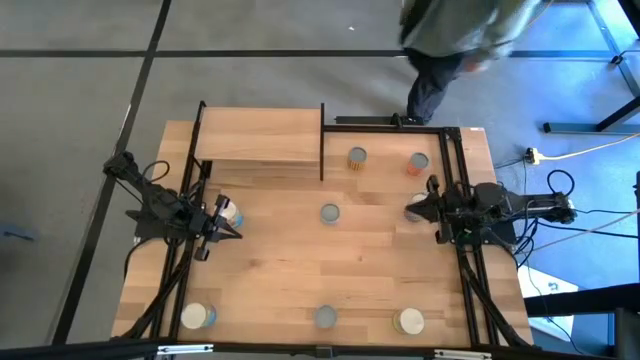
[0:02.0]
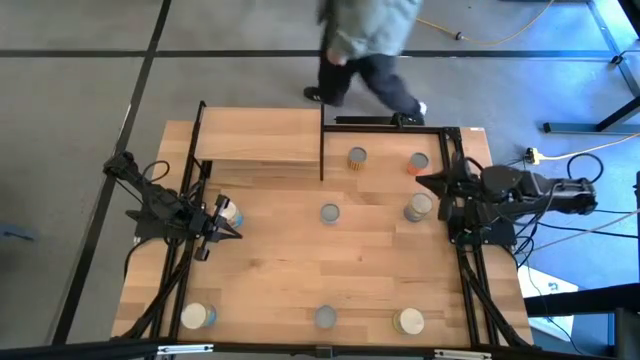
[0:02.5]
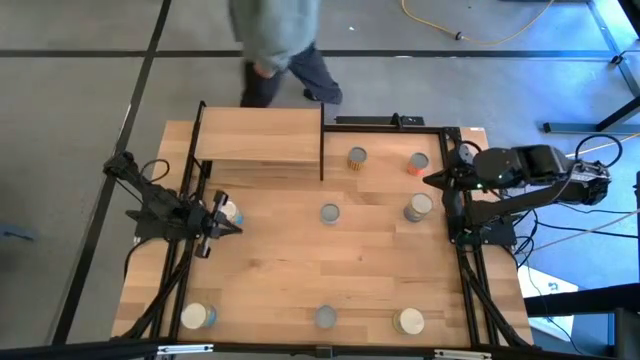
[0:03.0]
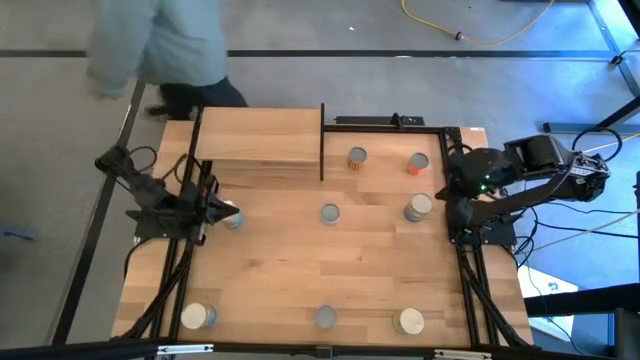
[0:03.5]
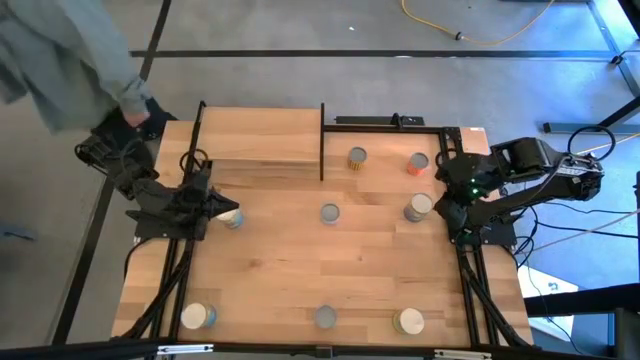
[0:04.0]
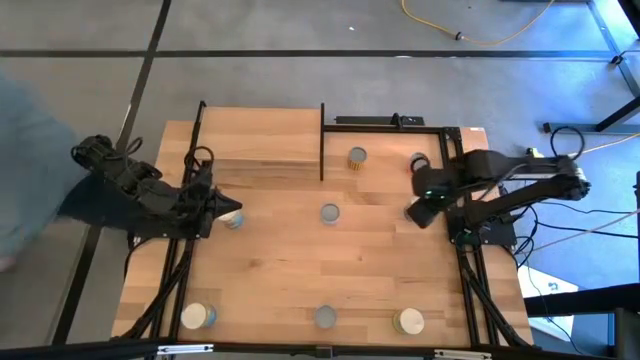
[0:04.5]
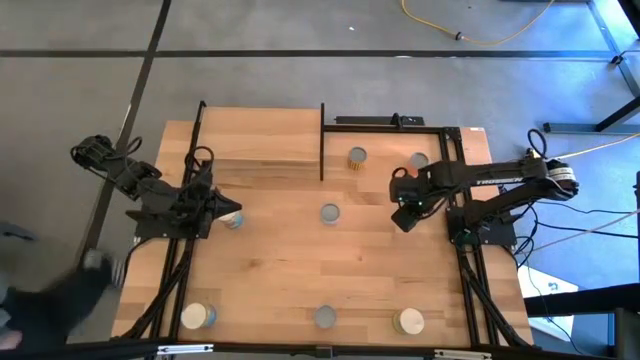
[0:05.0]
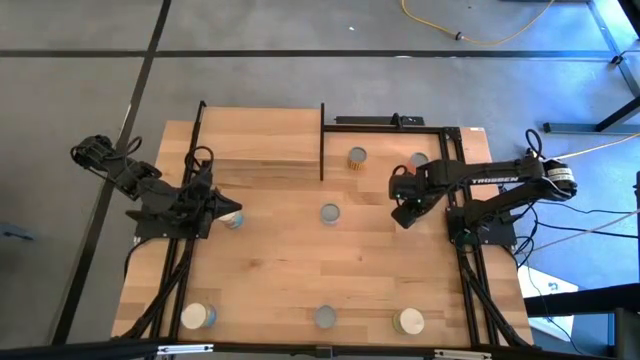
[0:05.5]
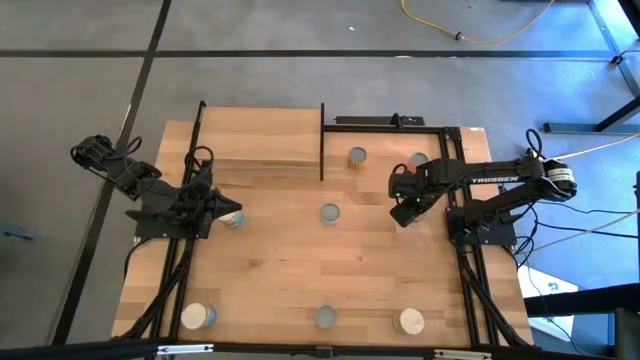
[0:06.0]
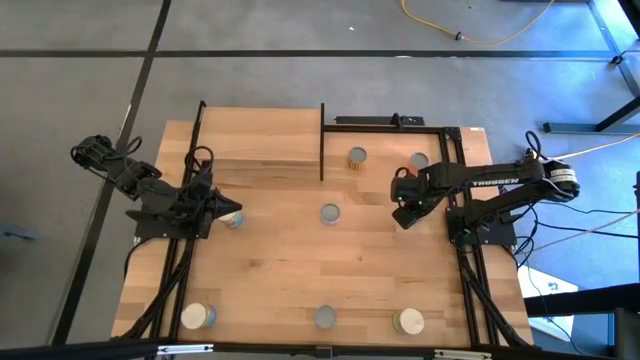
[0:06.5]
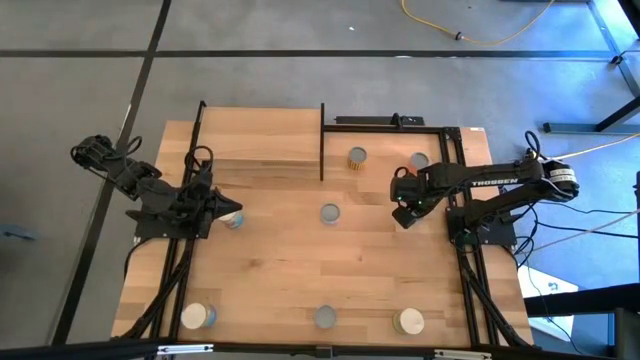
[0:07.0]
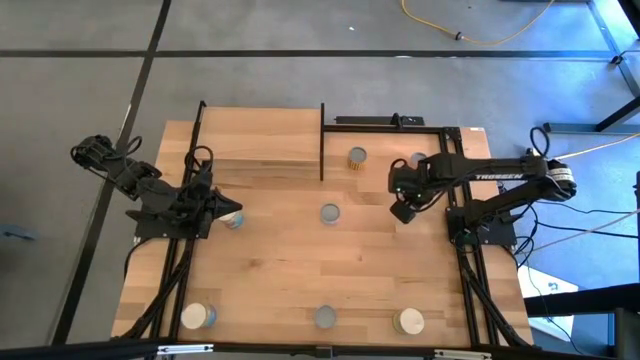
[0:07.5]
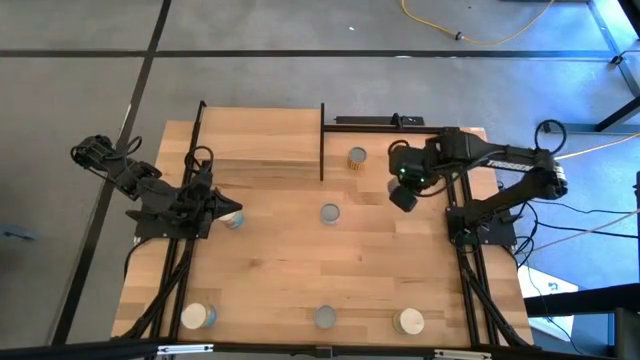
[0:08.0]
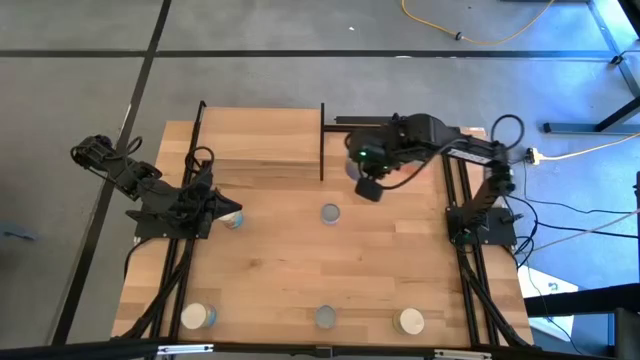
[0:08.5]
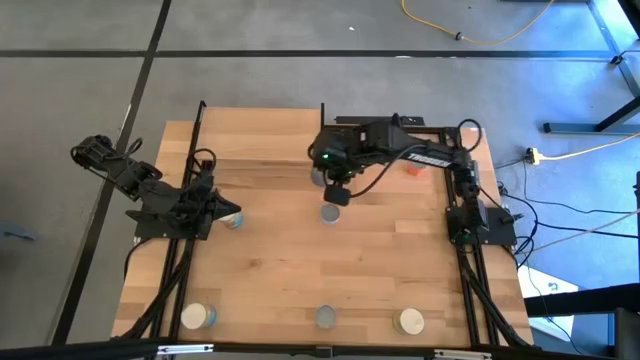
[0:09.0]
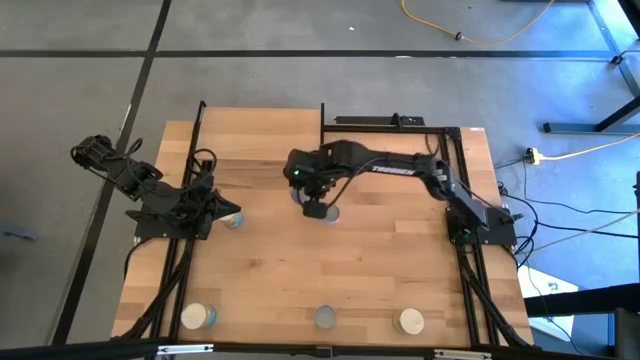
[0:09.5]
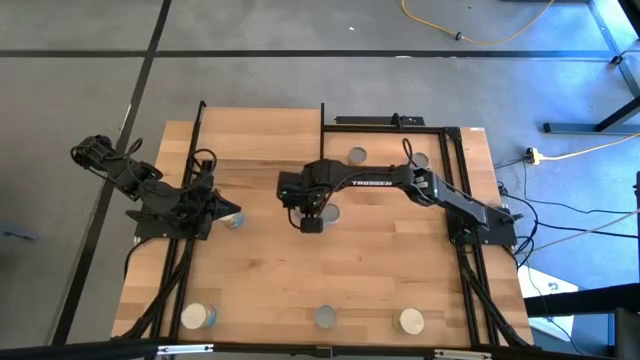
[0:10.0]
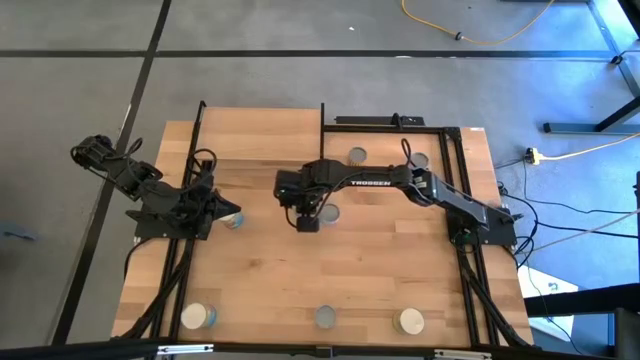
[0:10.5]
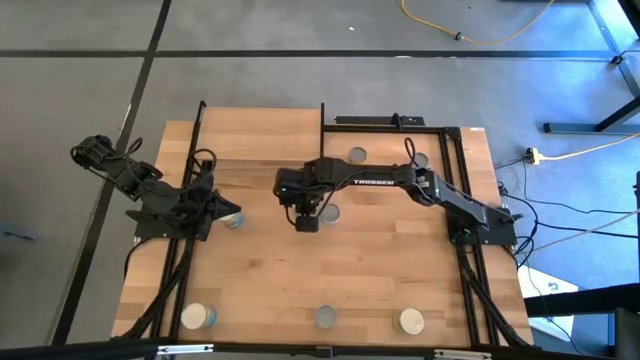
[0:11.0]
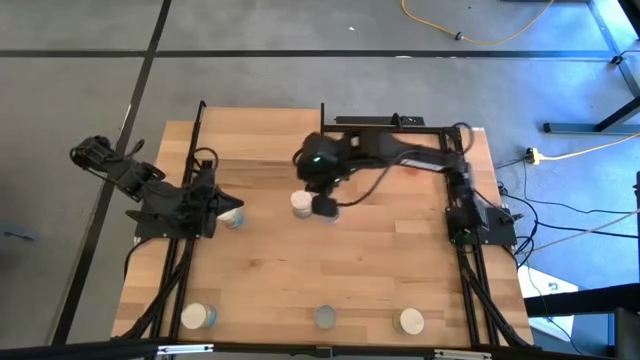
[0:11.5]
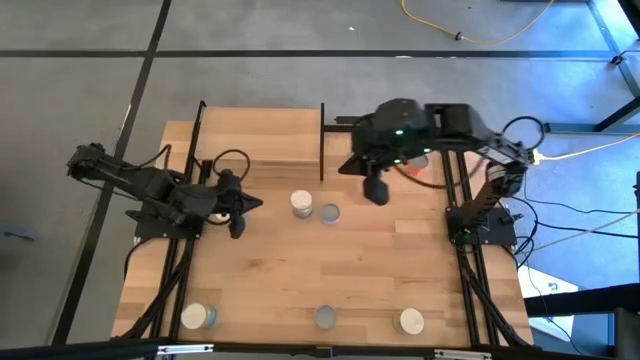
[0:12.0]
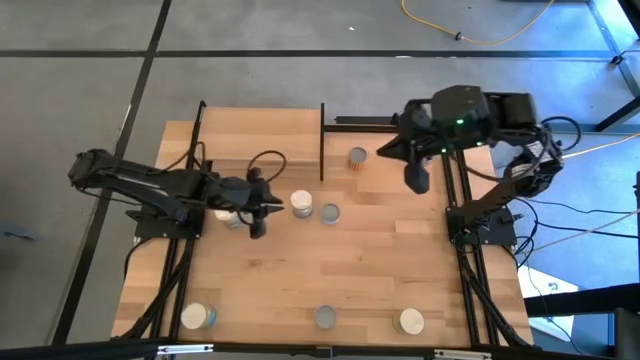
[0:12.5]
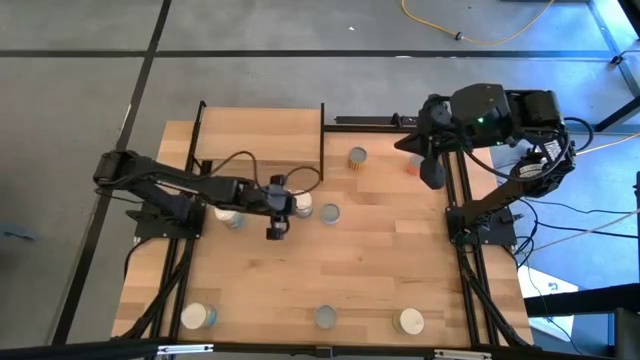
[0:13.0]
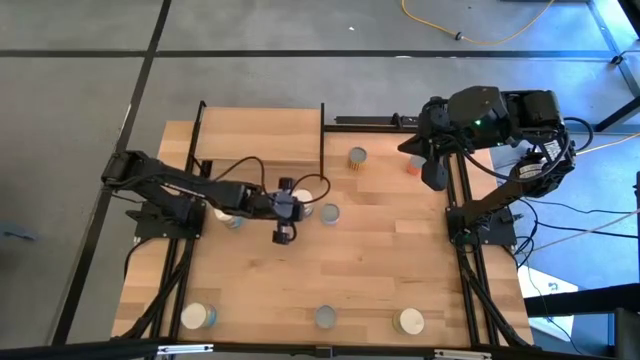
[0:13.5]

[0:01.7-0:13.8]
Task: Pick and place cans onto a shelf
Put the blue canned peas on the shelf

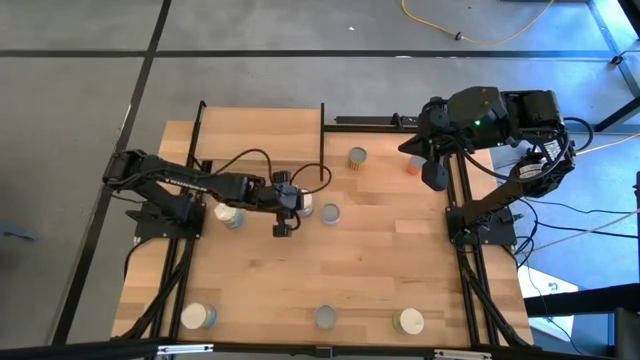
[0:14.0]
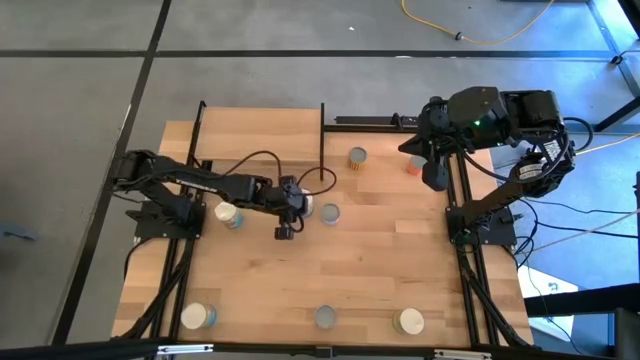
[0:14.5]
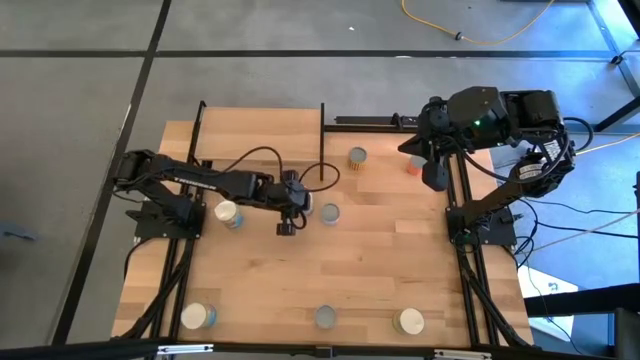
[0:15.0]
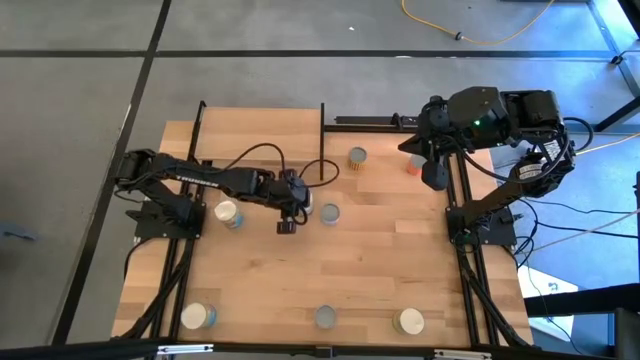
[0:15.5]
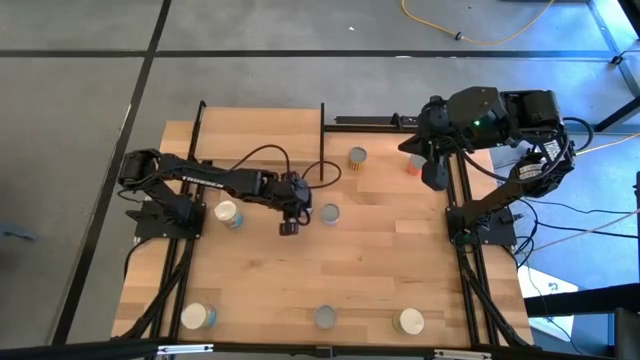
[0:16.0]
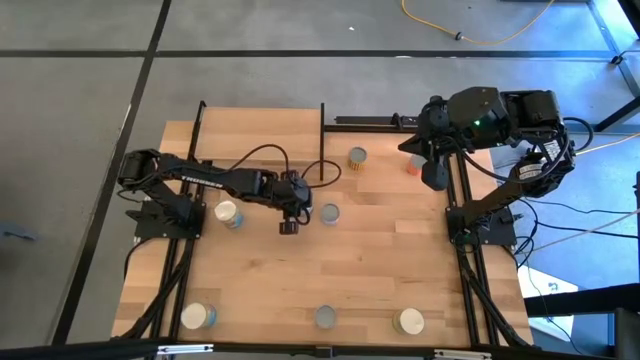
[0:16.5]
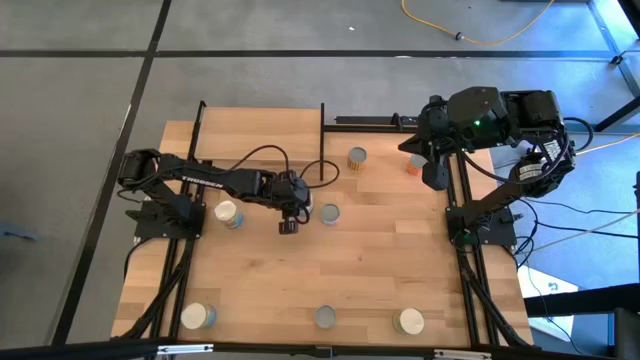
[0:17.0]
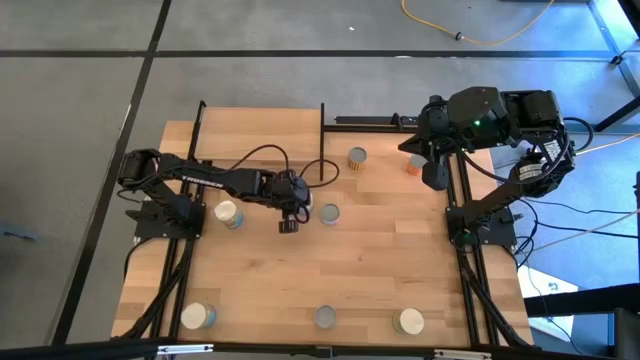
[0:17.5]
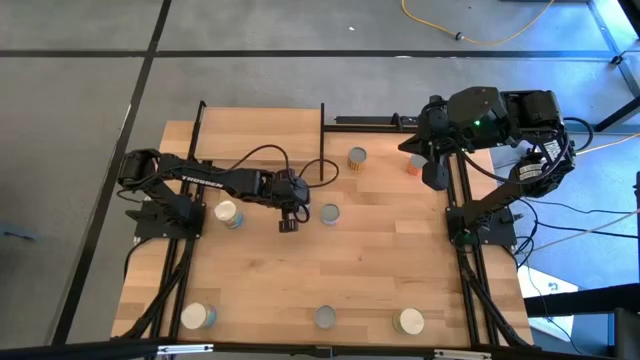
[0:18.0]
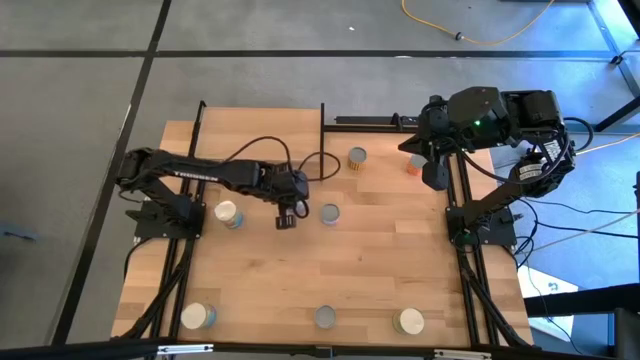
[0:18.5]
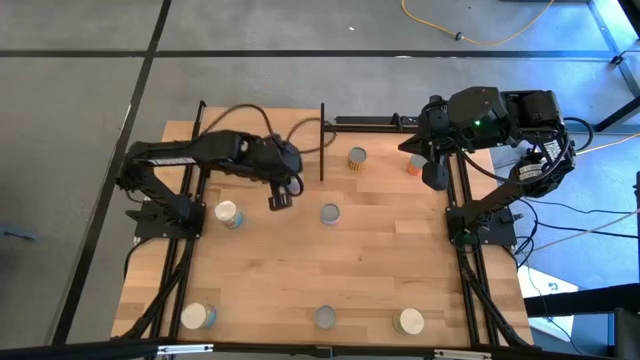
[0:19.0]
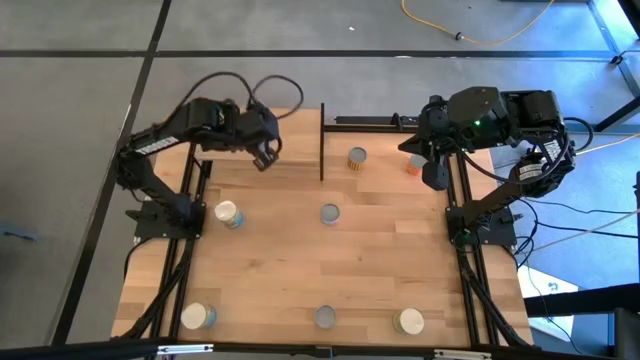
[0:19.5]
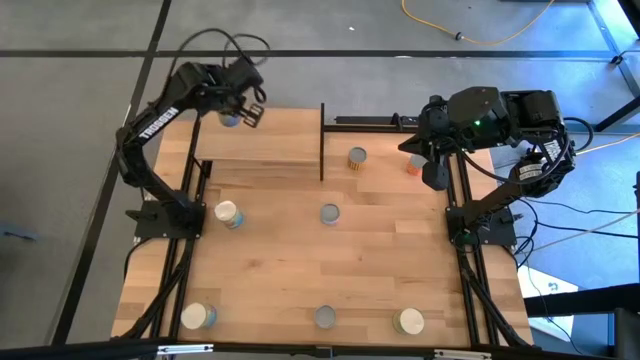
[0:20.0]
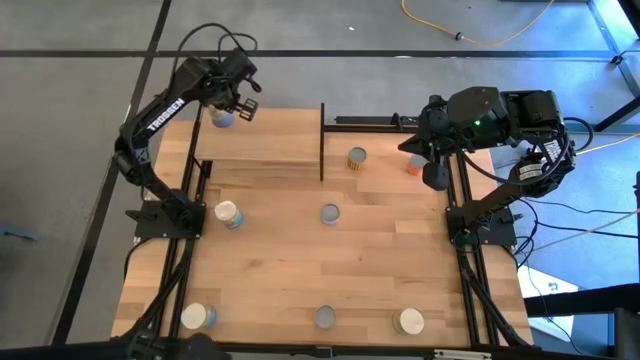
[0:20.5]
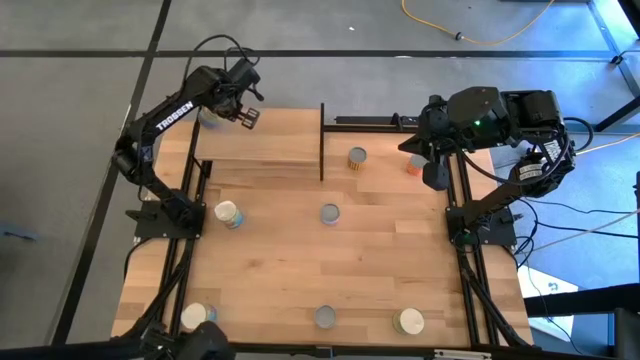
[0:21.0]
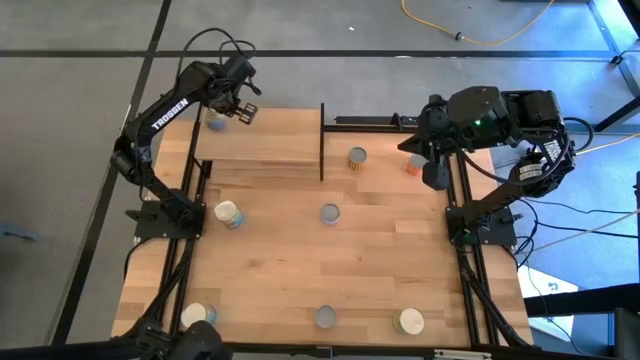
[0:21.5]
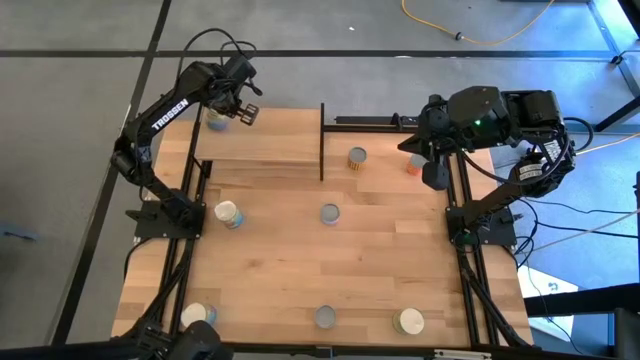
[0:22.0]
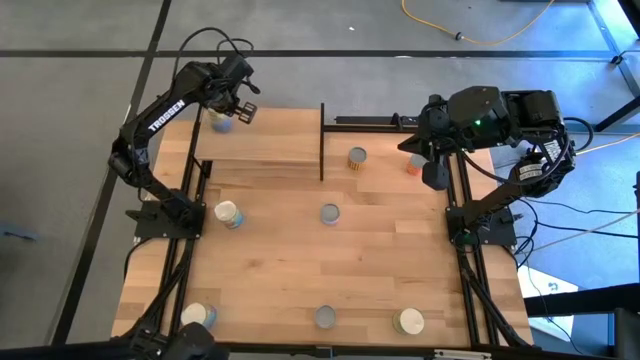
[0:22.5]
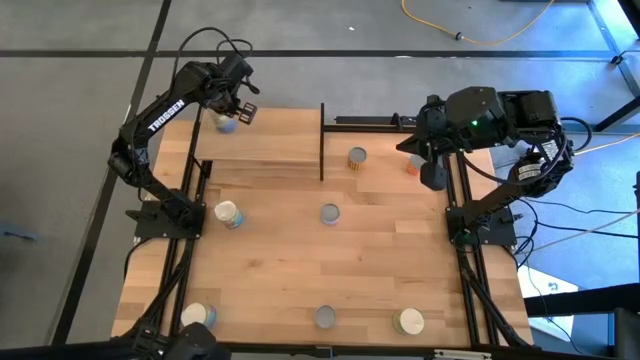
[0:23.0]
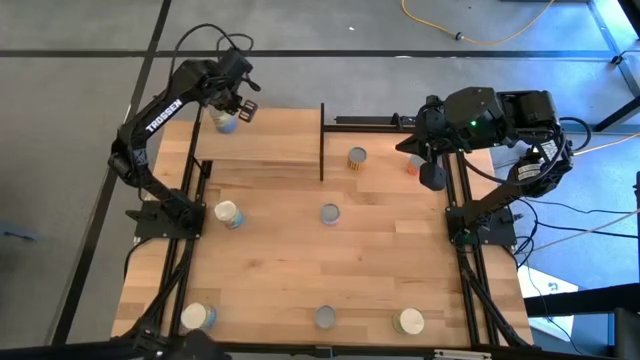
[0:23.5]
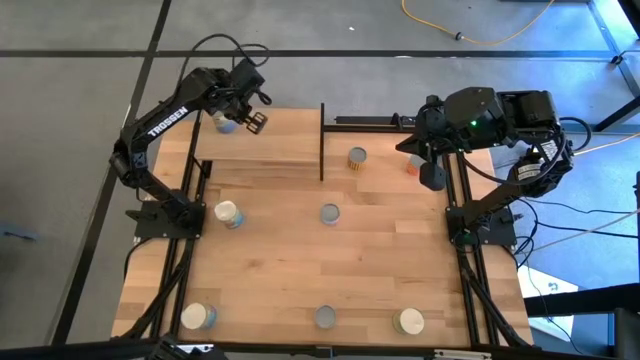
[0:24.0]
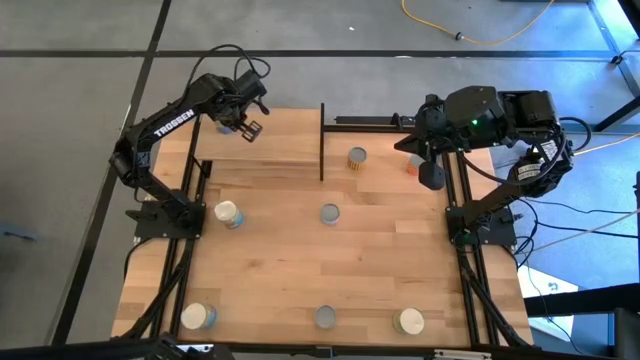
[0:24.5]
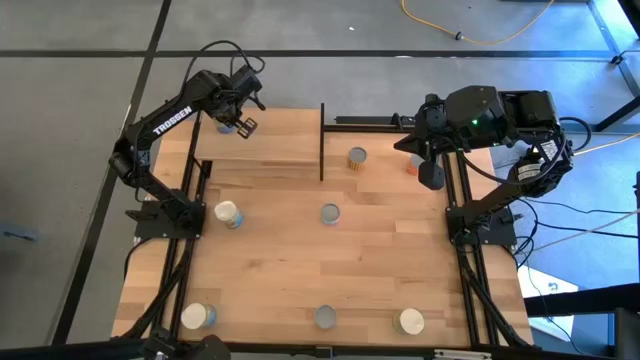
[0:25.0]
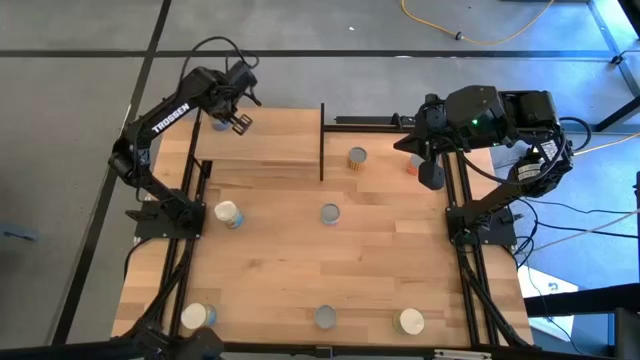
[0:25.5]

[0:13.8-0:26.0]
Put the blue canned peas on the shelf
